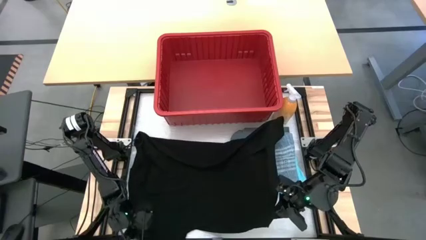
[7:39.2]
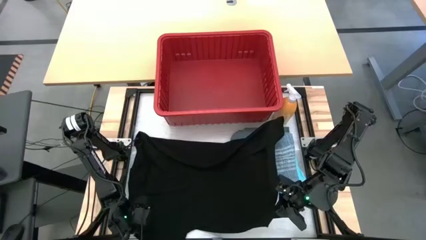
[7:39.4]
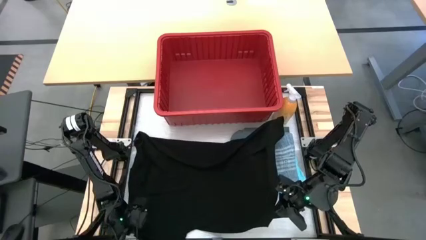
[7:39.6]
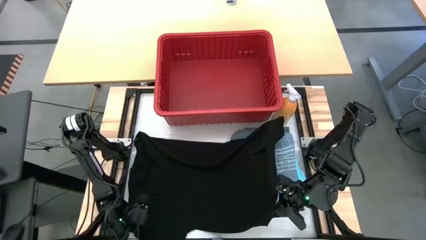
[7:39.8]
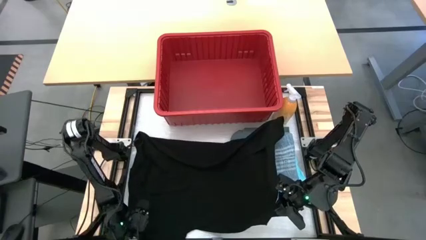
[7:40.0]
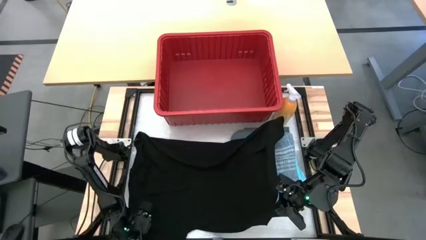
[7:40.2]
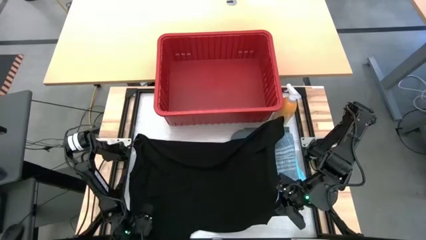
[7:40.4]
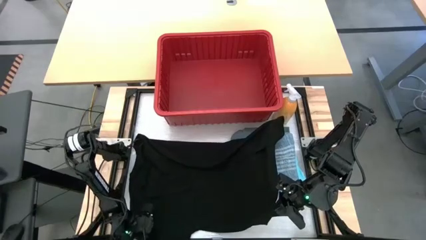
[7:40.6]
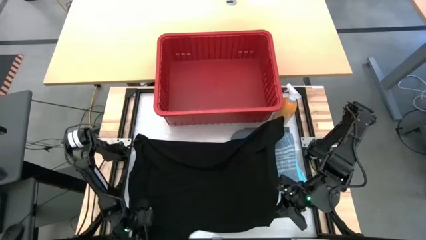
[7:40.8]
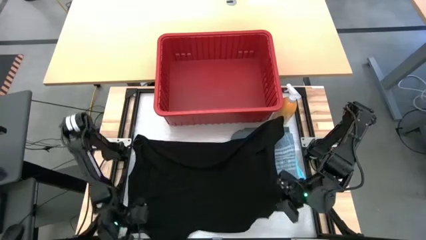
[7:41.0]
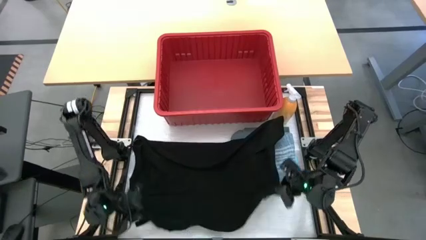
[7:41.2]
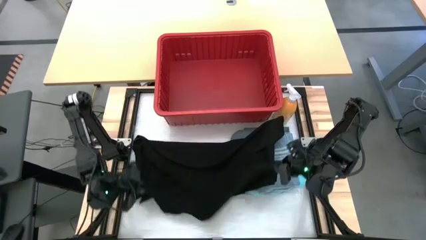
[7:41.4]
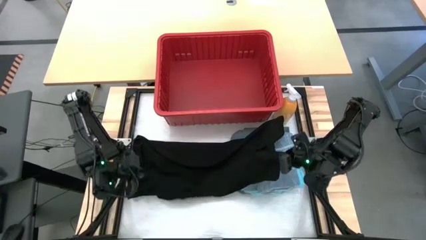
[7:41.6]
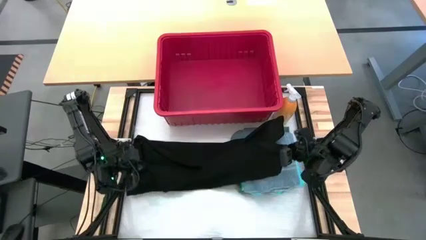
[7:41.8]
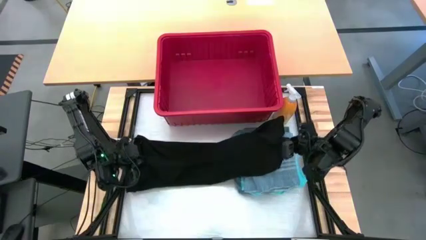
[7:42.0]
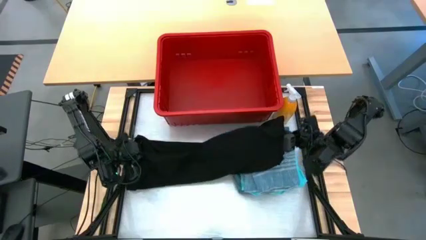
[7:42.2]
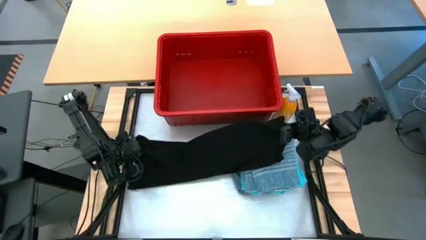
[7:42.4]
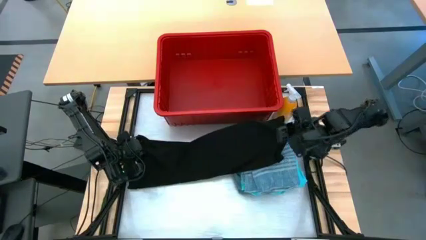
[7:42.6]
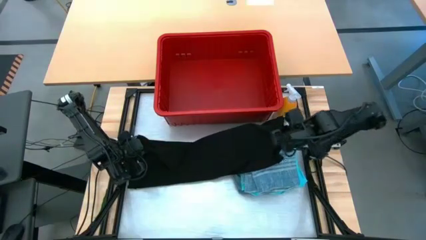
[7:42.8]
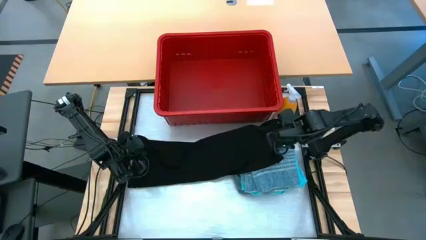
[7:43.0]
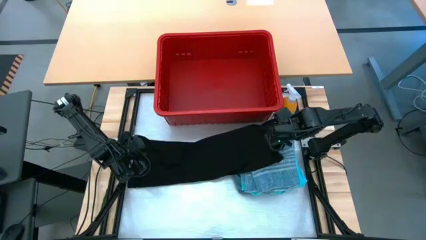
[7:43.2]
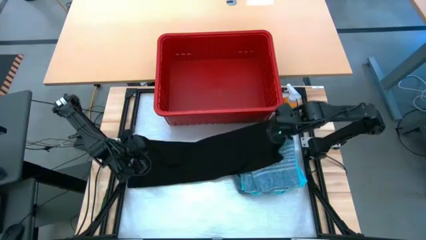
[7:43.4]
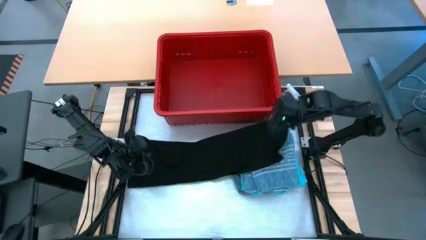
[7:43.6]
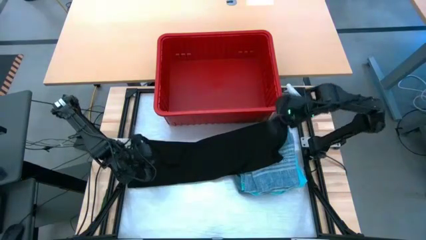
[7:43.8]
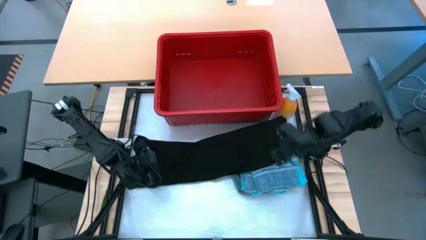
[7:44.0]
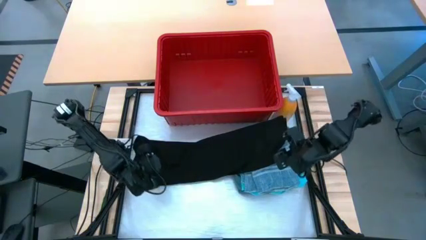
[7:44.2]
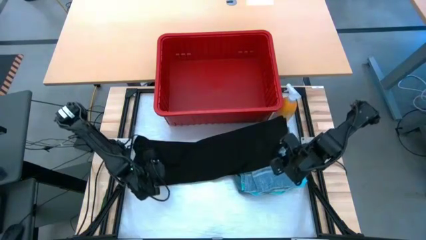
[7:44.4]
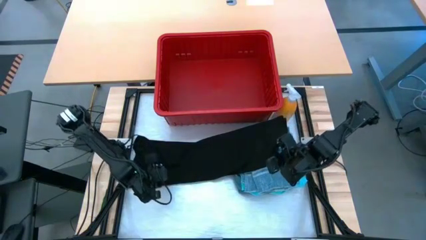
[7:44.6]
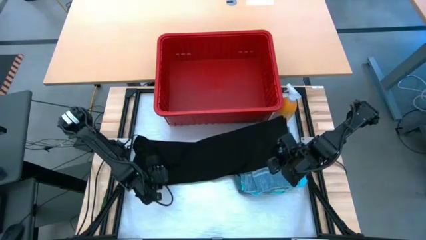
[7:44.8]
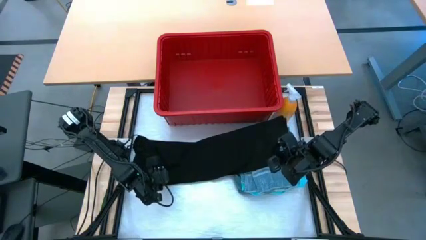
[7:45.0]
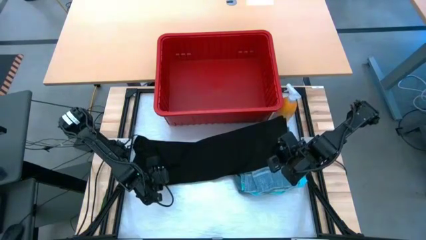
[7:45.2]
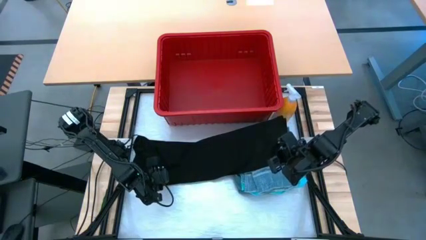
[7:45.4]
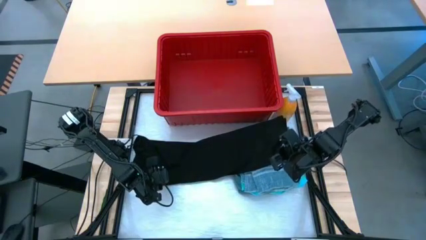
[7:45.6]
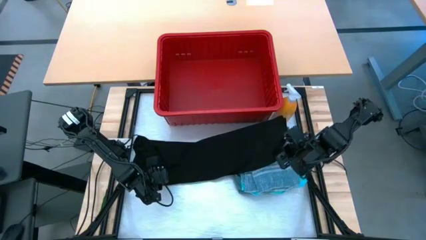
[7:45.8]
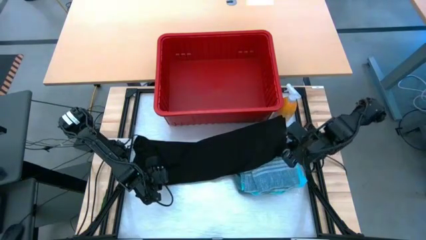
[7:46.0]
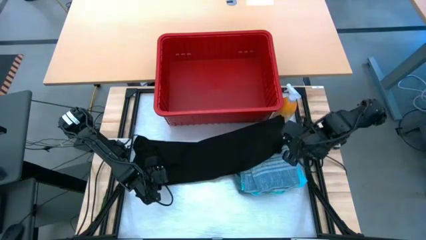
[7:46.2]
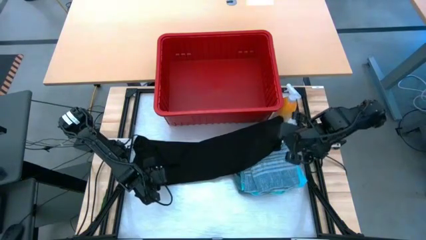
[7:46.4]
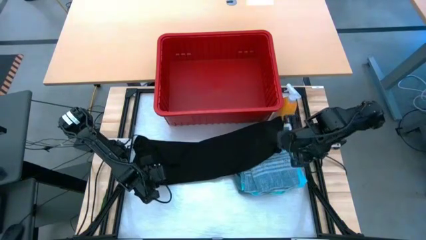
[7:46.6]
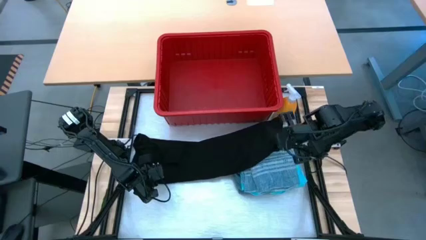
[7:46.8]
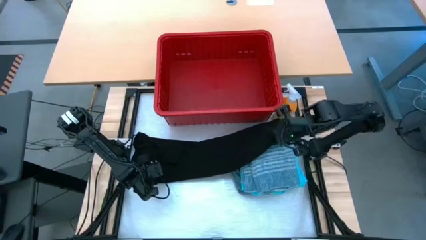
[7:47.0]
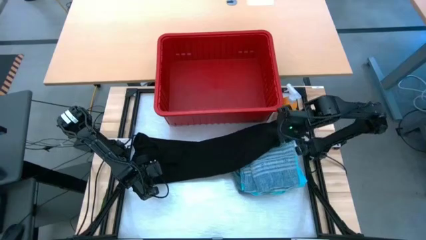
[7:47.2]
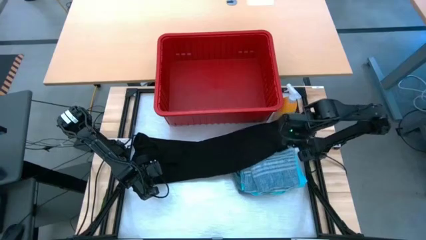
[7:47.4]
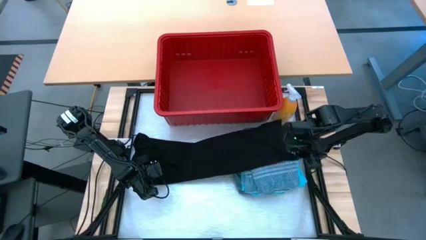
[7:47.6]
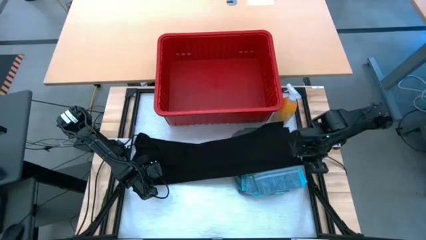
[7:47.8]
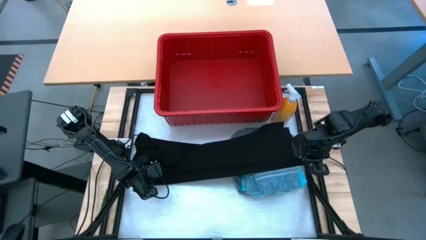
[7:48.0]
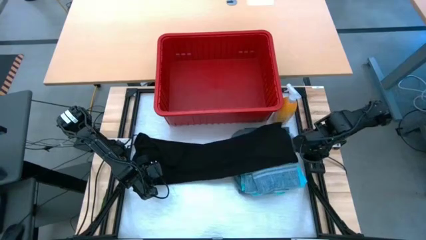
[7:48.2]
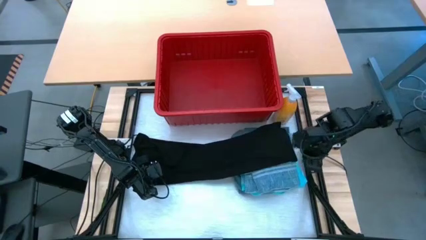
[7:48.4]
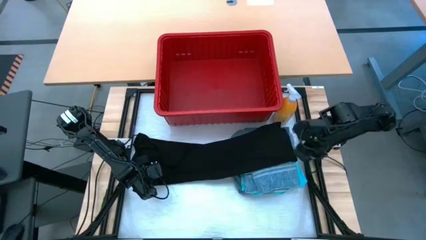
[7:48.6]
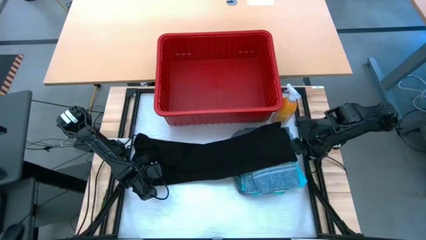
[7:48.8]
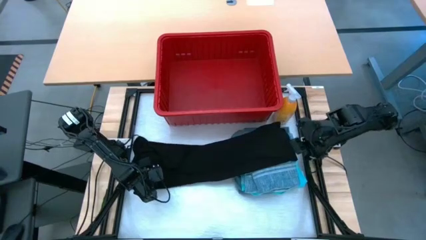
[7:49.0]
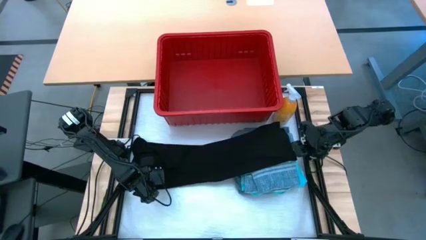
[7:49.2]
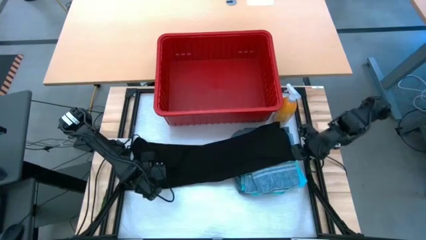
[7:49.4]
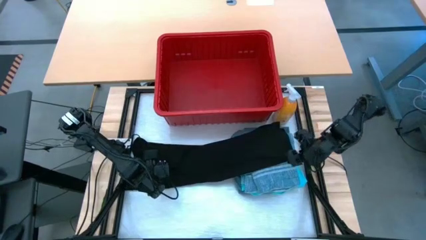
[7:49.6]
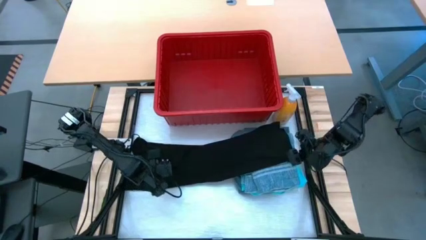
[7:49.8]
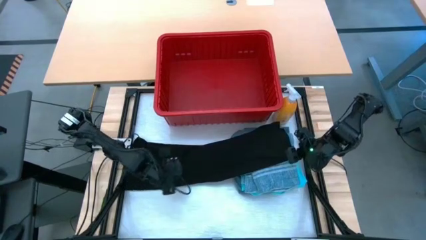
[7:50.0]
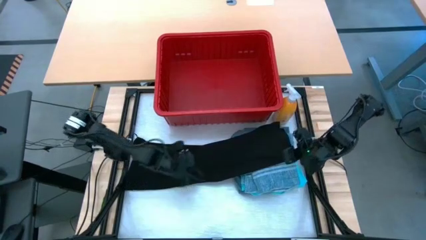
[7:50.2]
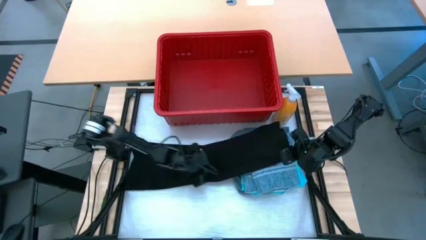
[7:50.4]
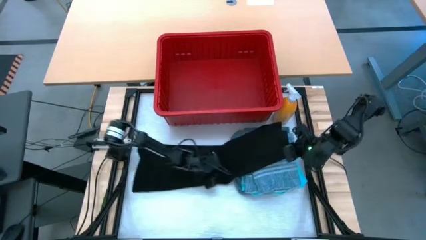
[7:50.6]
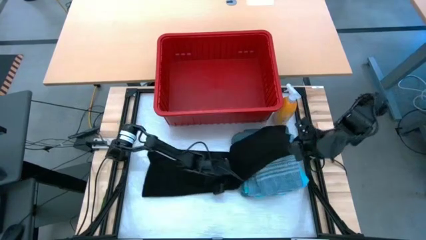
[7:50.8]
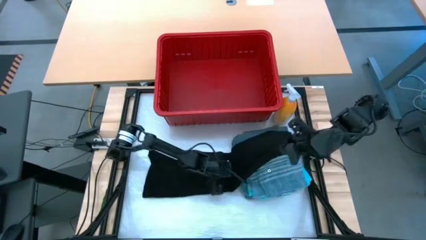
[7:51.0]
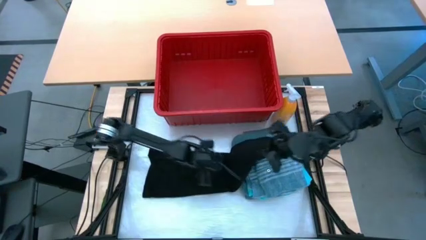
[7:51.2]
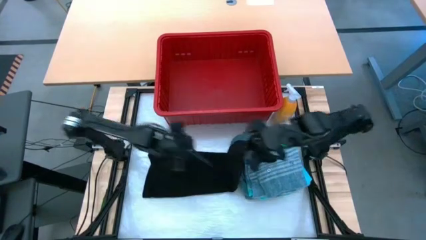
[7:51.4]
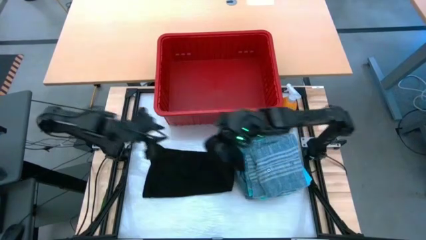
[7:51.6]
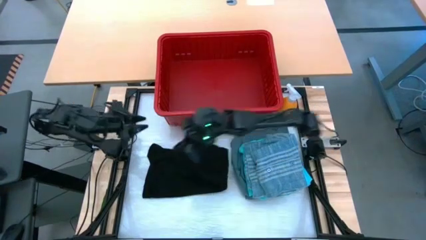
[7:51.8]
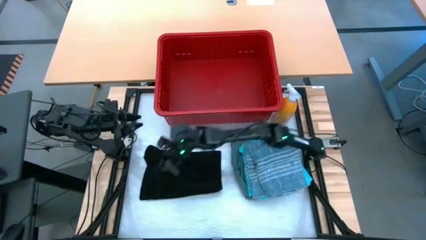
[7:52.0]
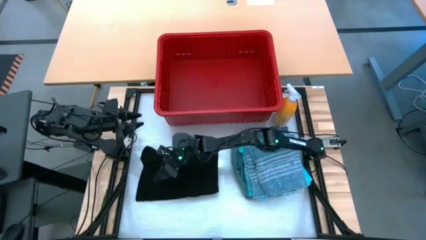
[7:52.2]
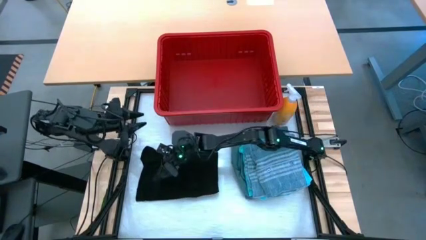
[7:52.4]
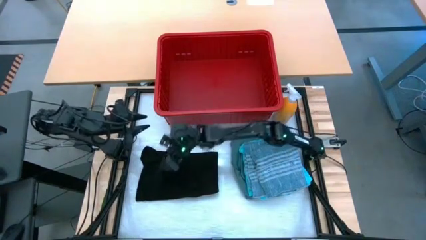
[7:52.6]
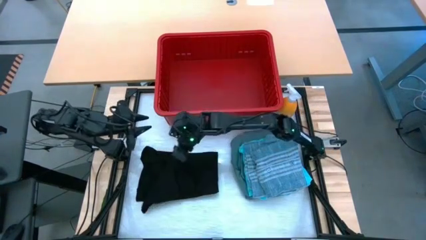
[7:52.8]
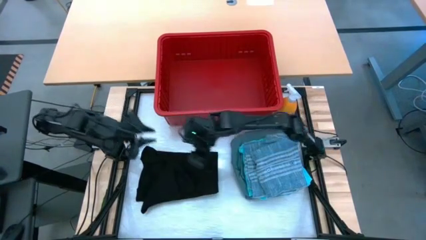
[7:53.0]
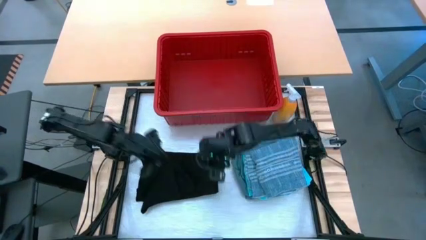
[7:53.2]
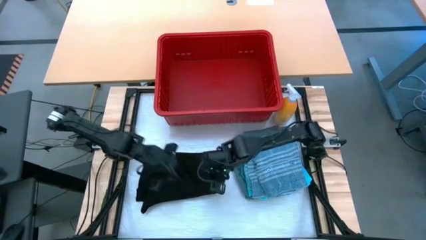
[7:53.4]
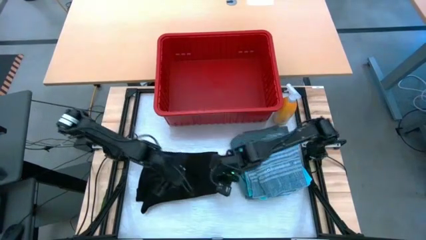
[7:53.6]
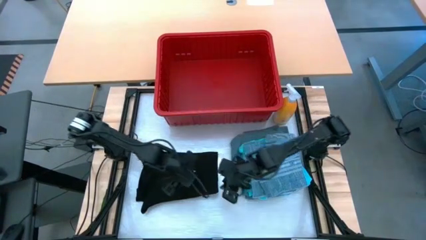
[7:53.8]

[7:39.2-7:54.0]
Task: Fold Laundry from Bin
Fold the black shirt
